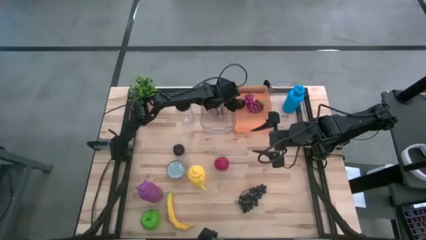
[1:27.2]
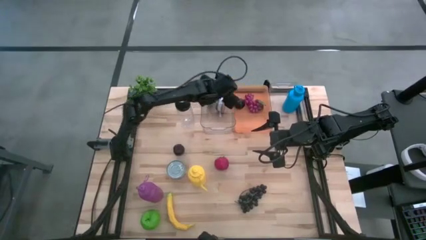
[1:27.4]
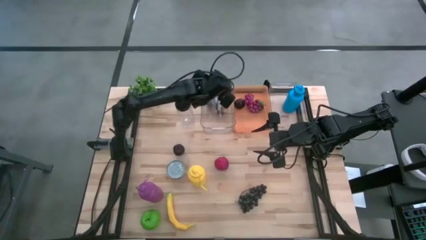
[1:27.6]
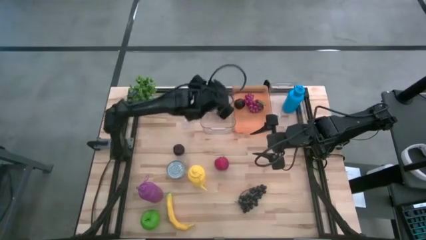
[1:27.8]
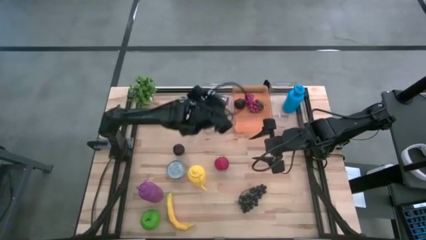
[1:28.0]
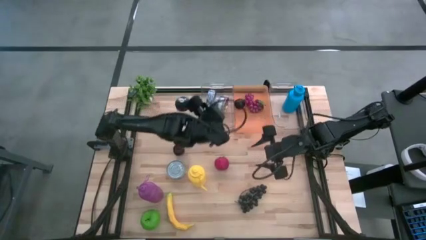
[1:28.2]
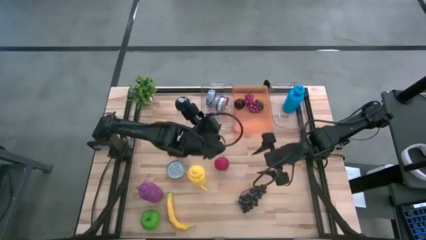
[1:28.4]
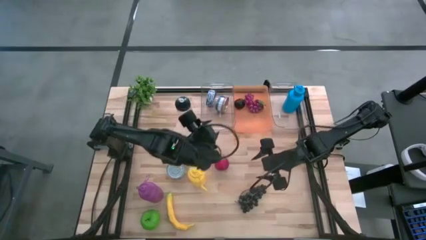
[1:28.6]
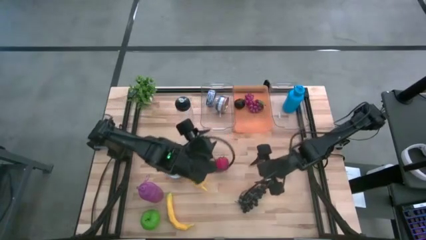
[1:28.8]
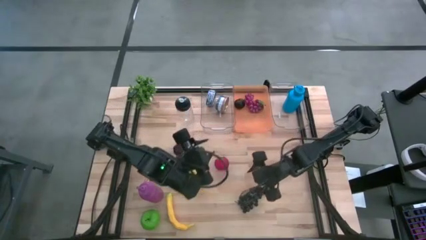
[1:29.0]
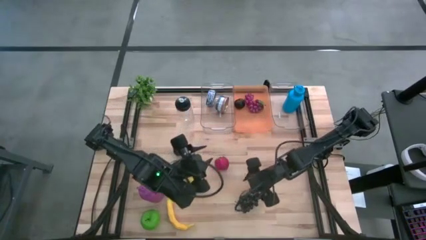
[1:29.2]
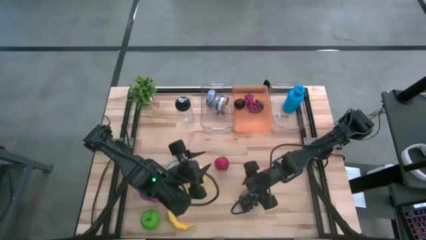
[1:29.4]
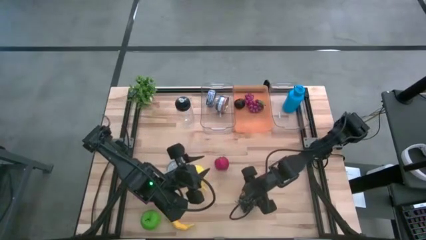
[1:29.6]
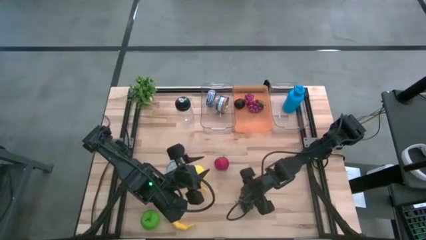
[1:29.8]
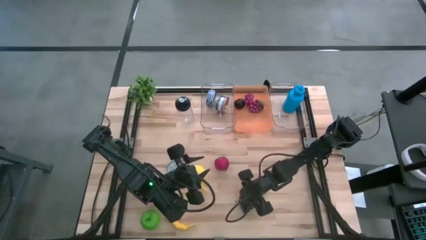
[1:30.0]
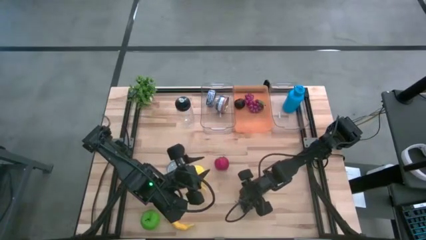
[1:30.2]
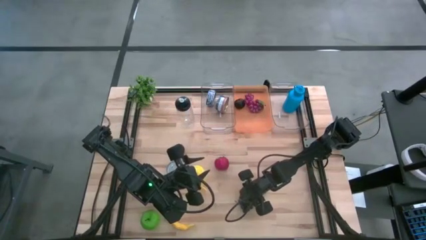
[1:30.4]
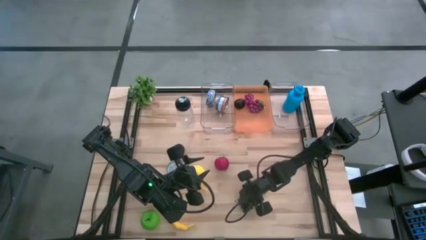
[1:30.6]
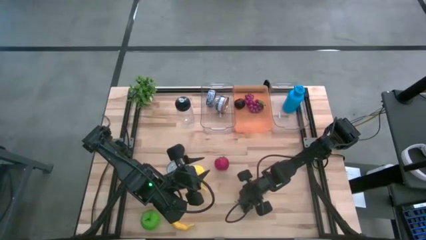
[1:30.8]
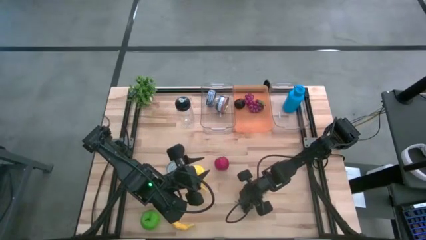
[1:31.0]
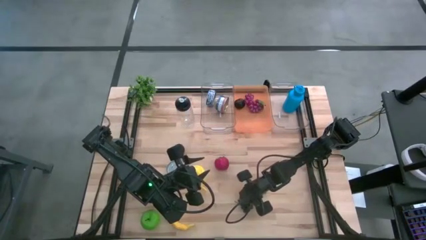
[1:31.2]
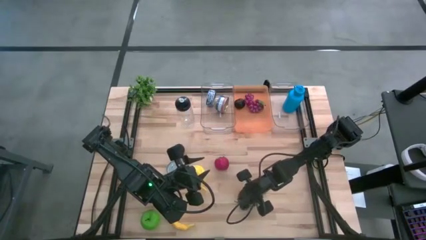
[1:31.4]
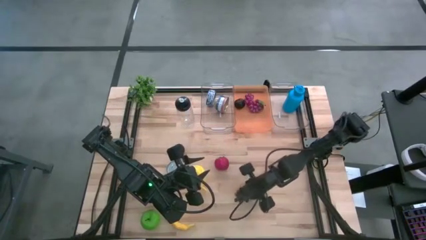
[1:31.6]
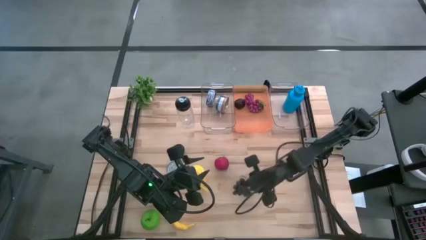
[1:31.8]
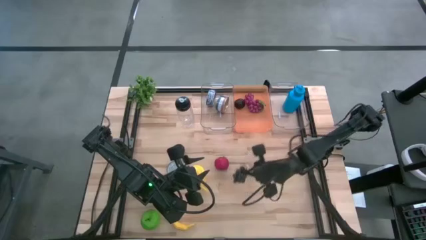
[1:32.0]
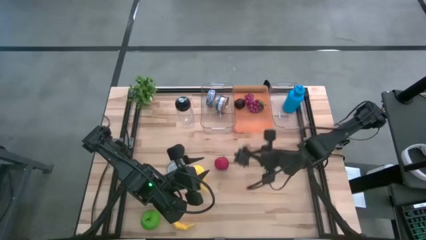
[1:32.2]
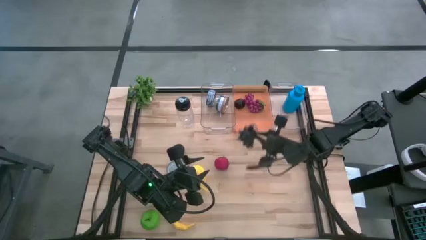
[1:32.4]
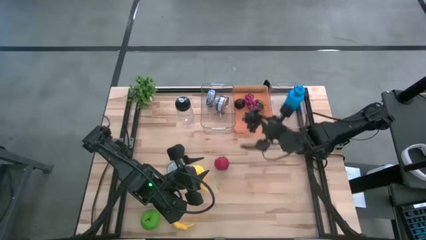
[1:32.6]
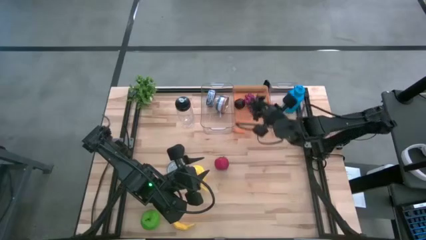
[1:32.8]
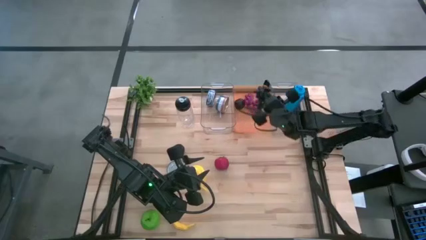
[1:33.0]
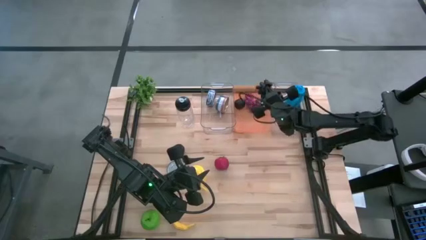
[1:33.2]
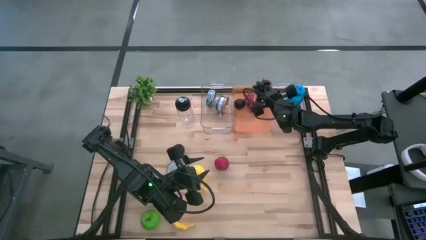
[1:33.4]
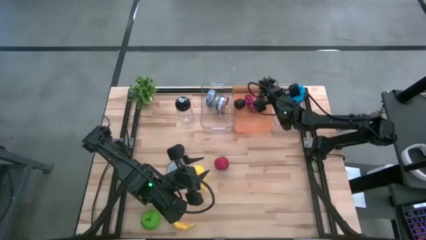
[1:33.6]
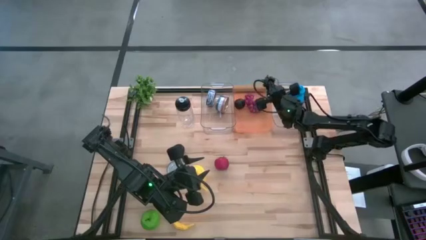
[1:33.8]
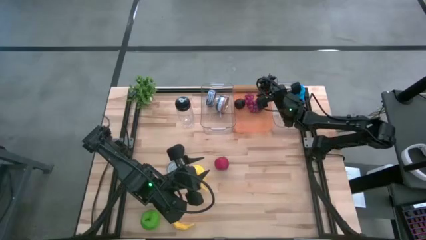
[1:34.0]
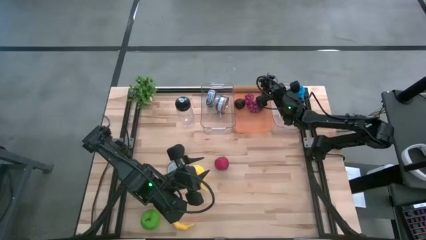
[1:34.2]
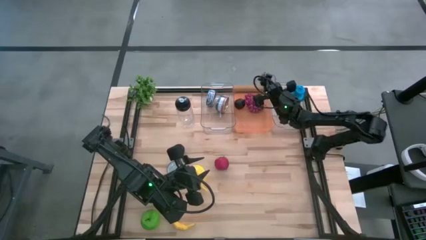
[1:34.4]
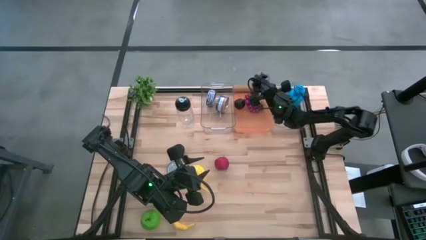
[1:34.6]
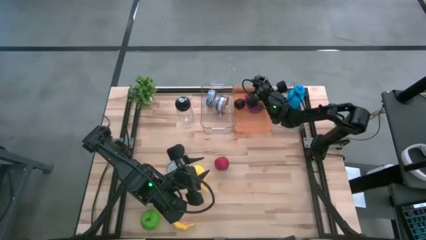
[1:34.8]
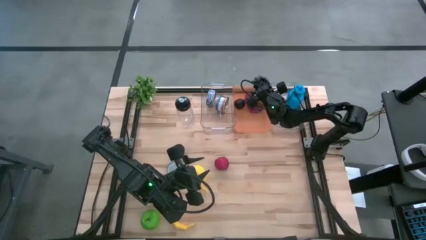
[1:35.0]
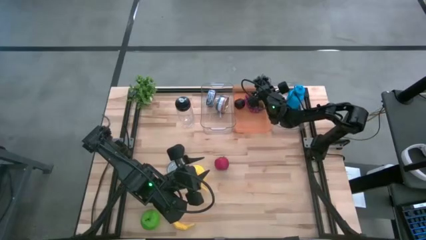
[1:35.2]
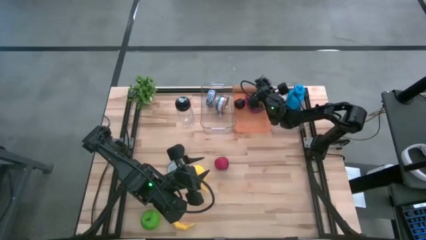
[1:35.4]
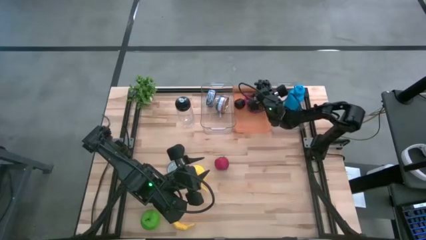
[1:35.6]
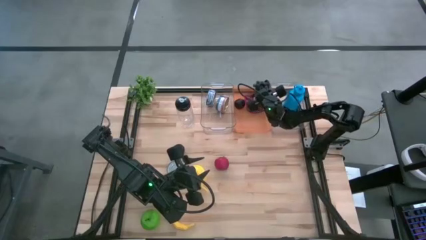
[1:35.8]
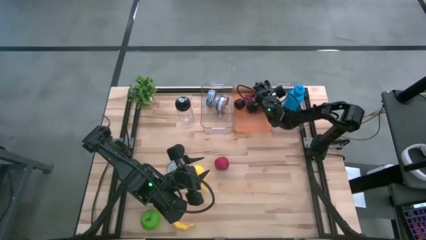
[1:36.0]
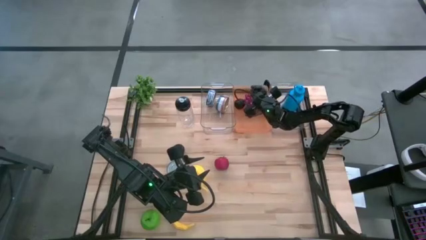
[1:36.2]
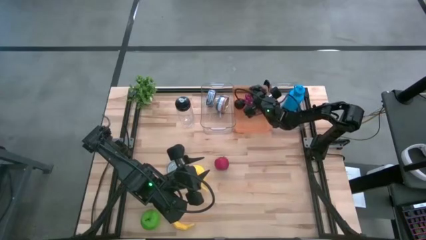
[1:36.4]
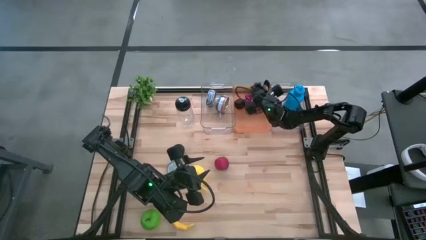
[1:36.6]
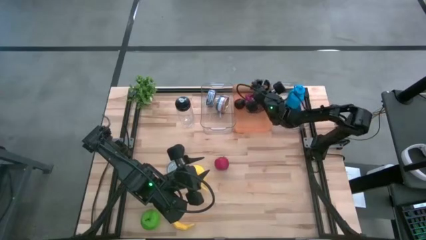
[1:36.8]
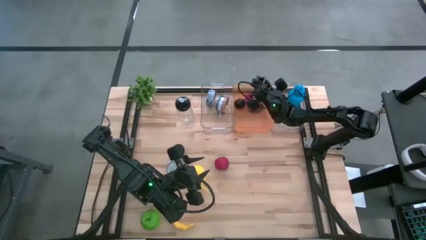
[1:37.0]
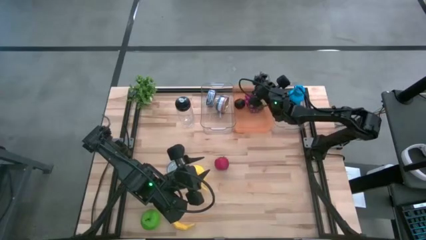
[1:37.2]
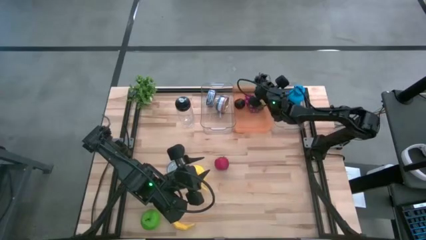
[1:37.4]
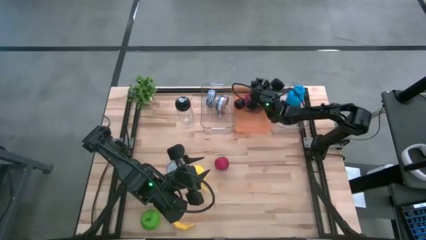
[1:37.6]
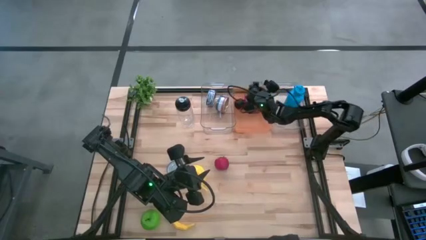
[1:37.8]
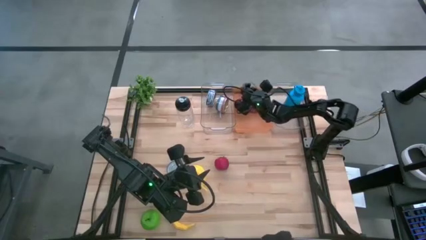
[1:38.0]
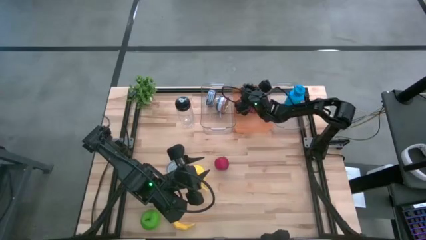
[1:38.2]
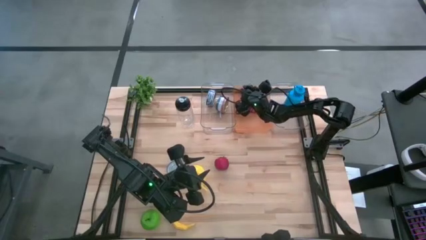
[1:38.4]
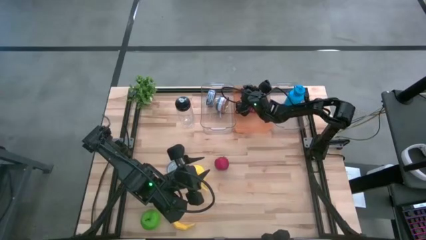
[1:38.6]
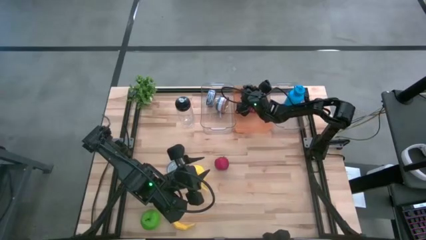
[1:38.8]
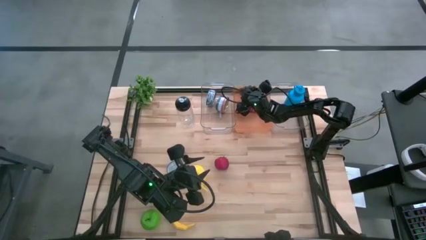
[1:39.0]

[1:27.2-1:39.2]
Task: Pick & Place Food Item
Put the black grapes into the orange bin
